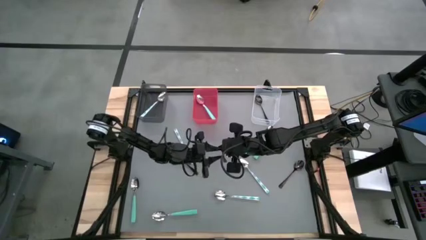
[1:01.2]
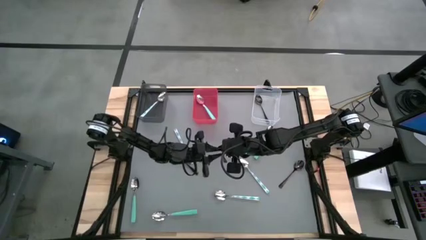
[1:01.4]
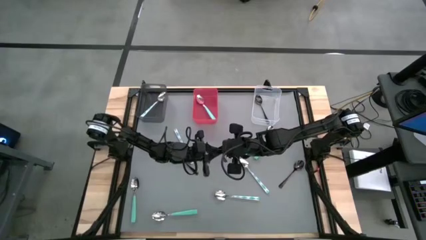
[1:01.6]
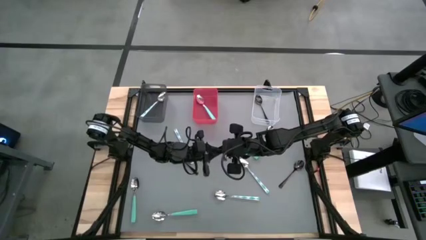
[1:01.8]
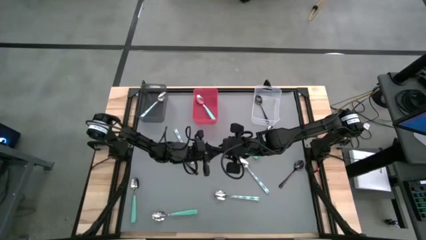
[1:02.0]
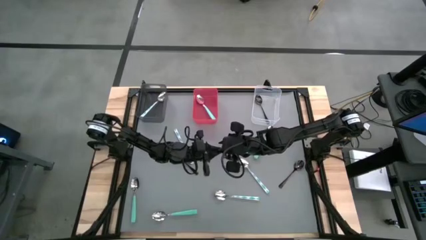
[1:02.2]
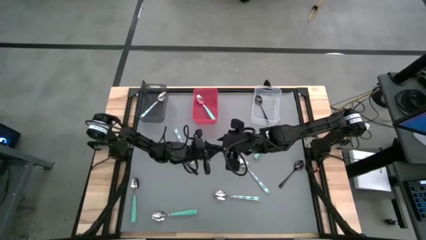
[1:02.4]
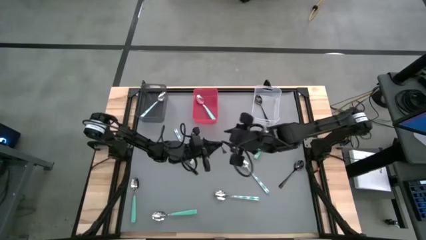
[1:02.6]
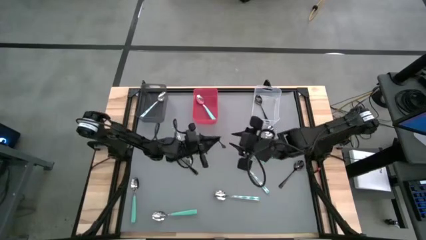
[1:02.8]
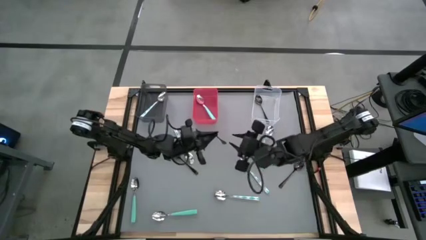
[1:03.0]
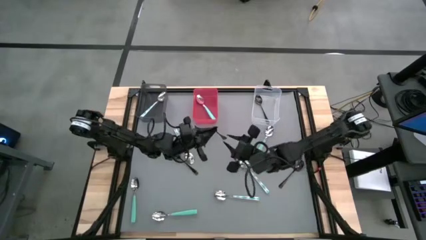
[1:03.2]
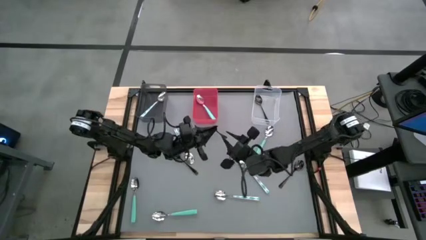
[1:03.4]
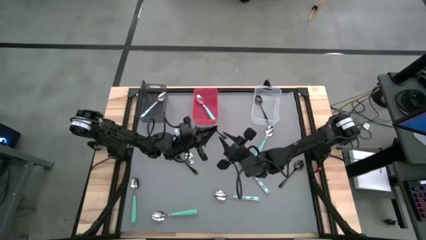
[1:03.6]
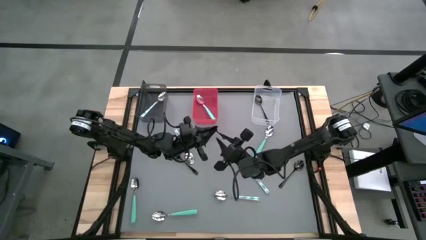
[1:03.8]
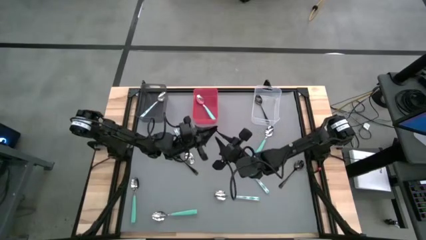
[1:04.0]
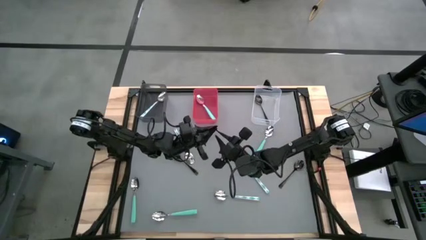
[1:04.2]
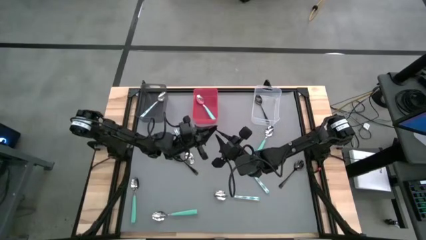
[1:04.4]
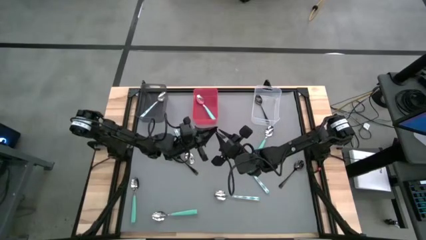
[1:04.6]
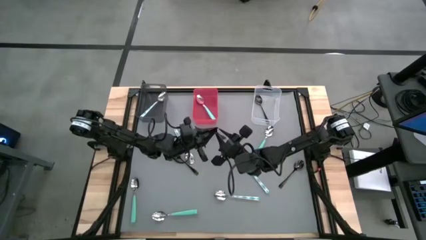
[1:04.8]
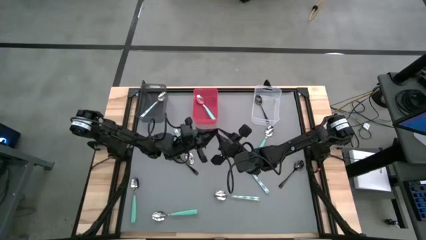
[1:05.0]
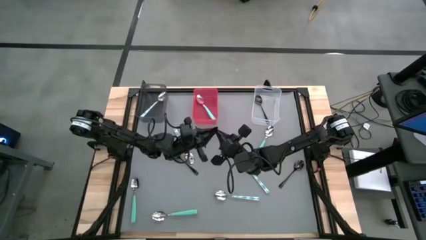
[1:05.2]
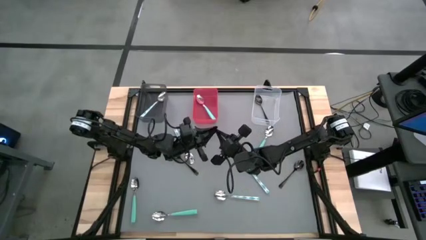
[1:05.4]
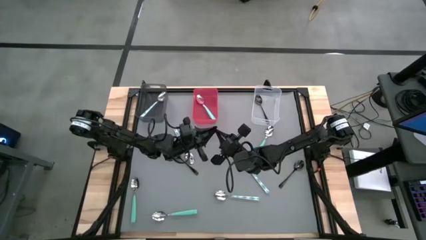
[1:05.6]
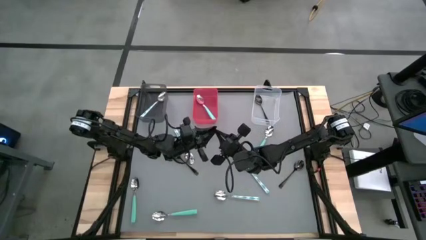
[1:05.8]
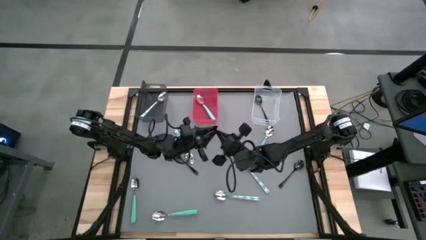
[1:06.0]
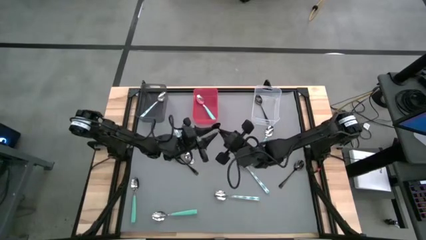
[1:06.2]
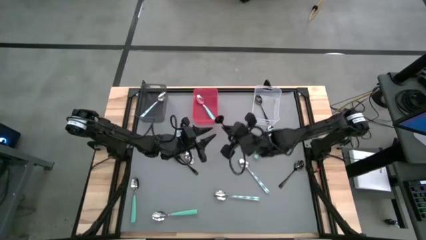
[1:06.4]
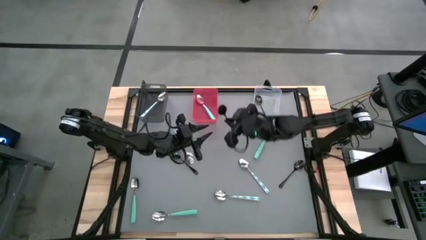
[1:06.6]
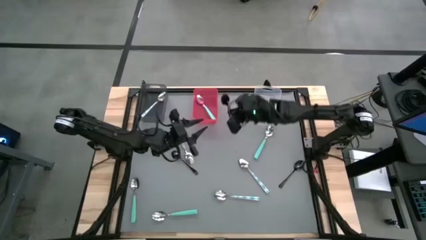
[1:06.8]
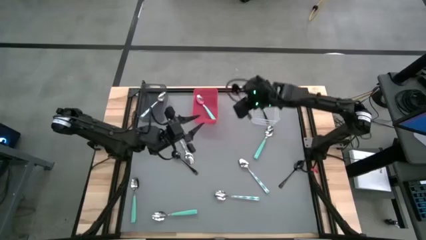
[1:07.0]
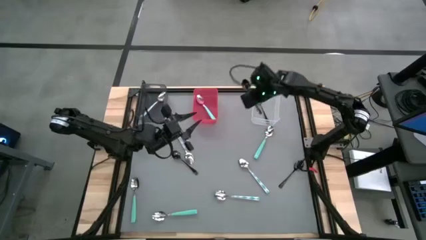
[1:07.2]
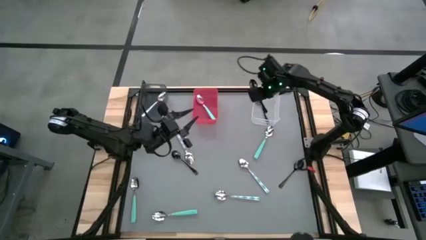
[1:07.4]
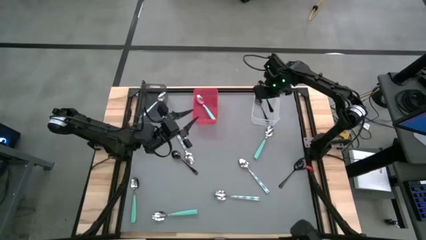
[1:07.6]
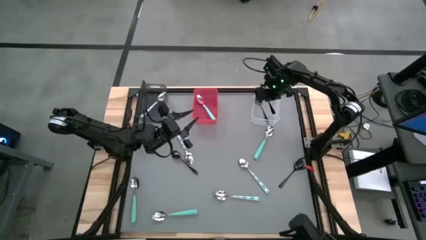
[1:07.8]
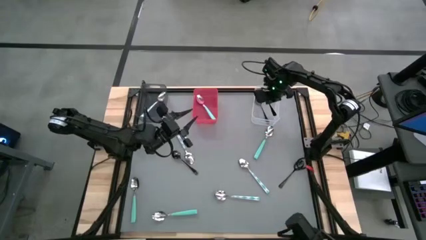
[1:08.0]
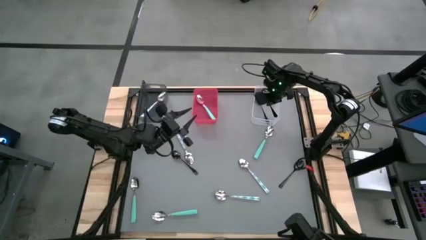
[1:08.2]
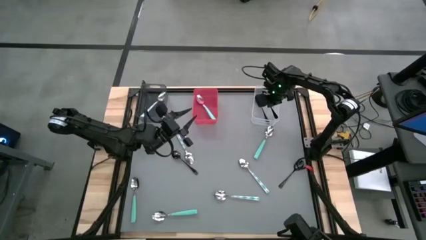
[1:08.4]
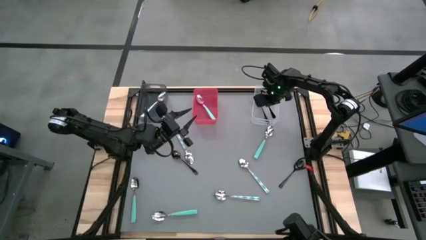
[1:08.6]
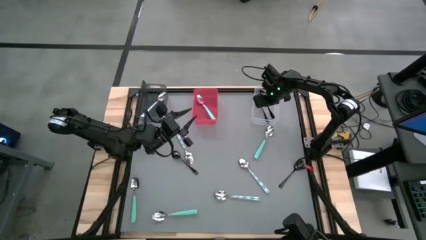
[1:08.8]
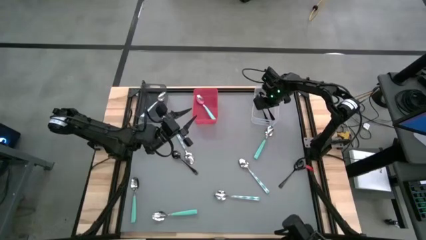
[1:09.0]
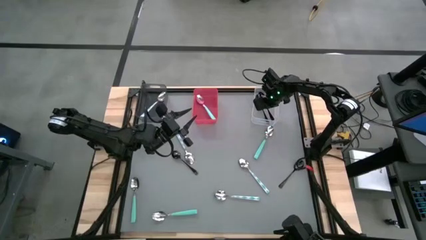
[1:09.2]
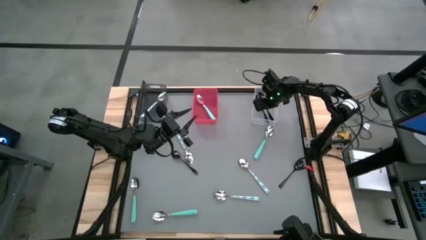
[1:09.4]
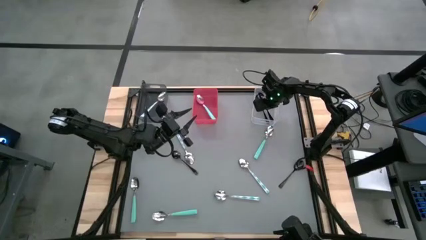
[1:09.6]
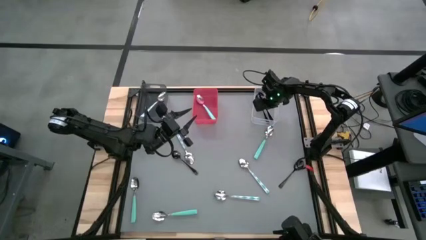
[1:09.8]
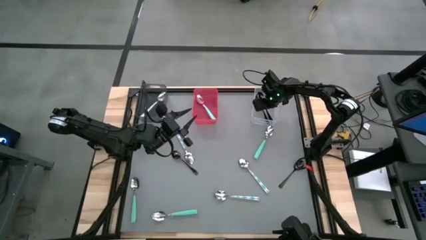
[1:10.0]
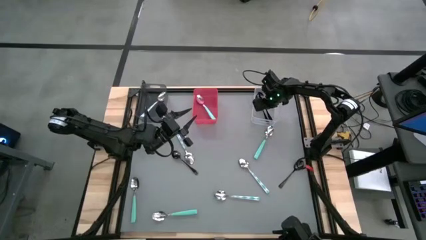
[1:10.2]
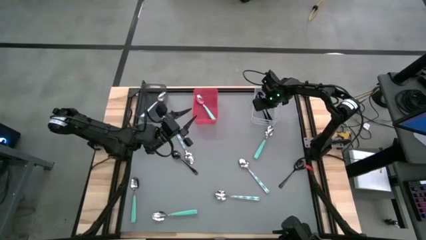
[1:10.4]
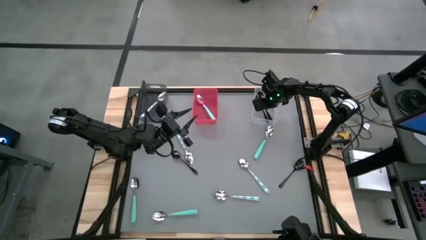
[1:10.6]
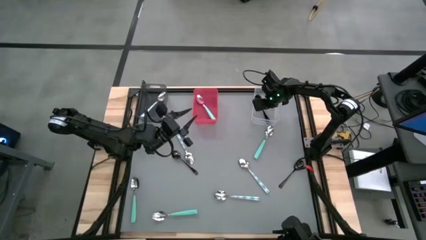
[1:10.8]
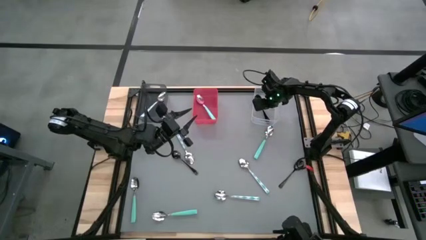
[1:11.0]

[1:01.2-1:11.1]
Task: Sort silverware by color (type)
Put the black spoon into the transparent bin

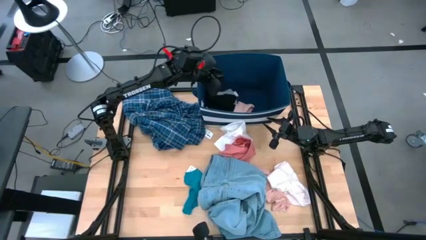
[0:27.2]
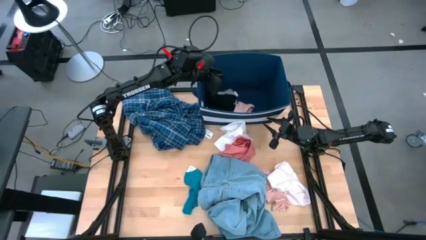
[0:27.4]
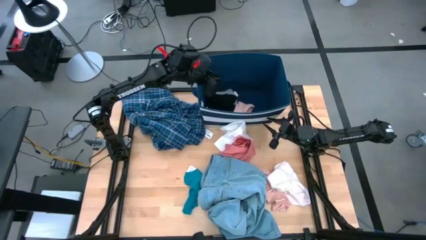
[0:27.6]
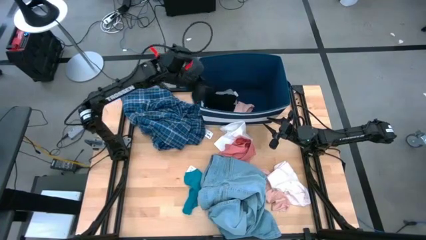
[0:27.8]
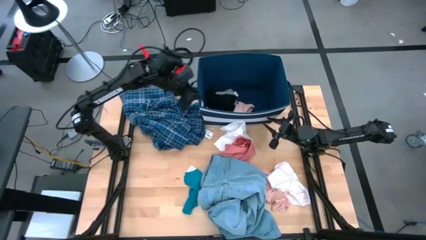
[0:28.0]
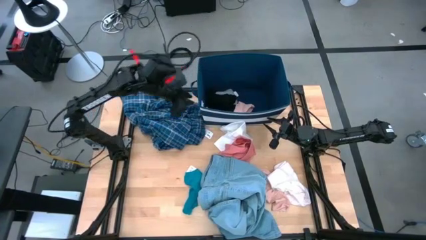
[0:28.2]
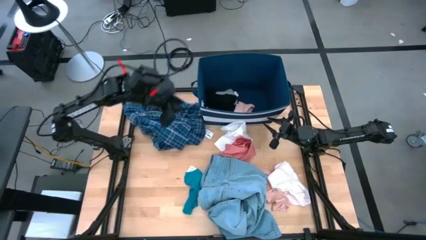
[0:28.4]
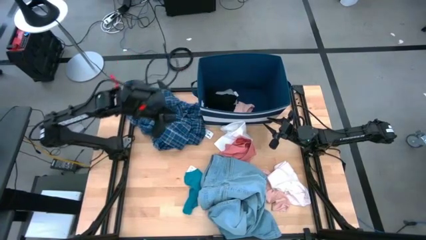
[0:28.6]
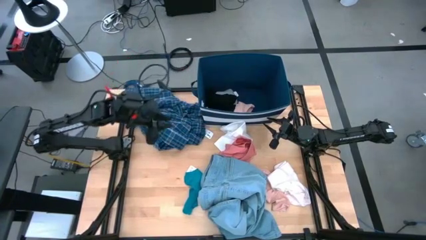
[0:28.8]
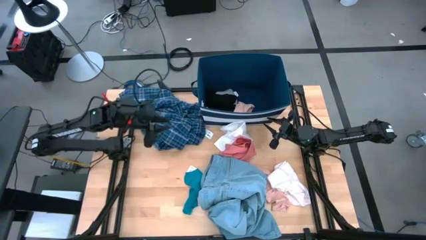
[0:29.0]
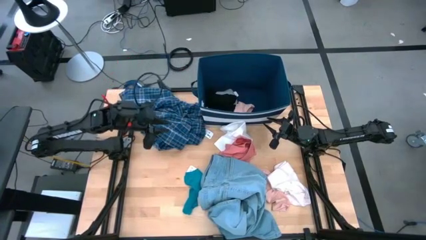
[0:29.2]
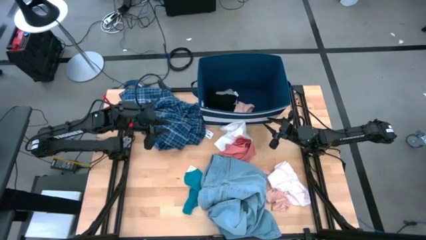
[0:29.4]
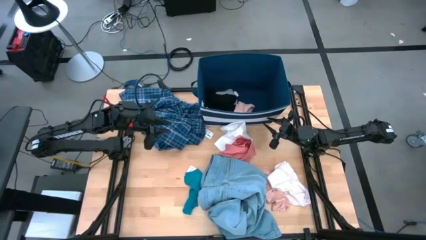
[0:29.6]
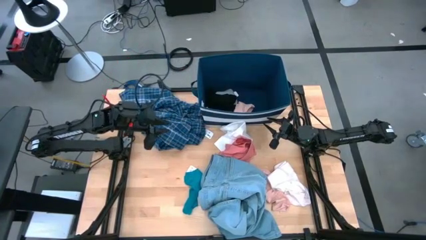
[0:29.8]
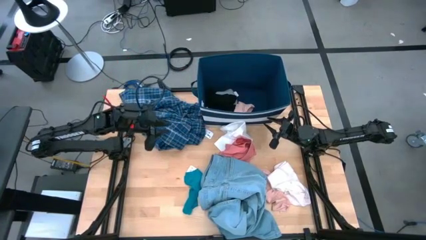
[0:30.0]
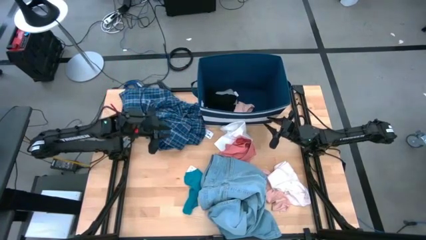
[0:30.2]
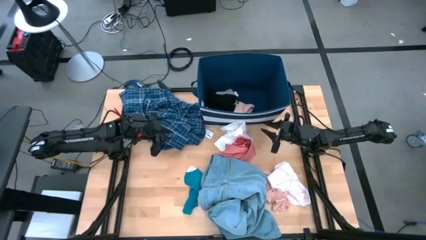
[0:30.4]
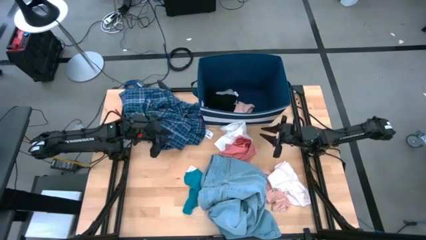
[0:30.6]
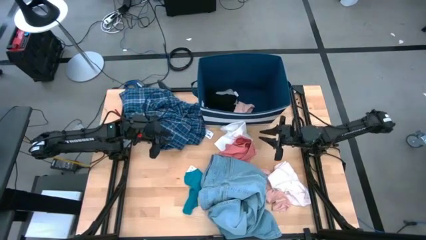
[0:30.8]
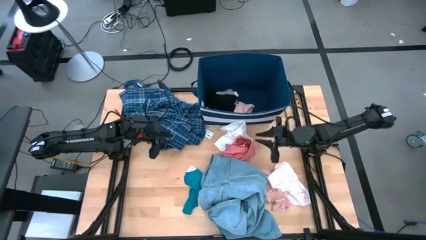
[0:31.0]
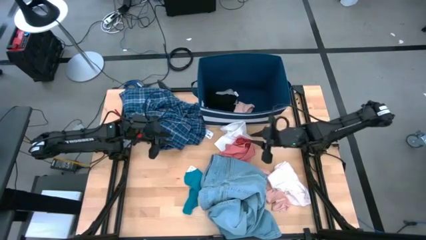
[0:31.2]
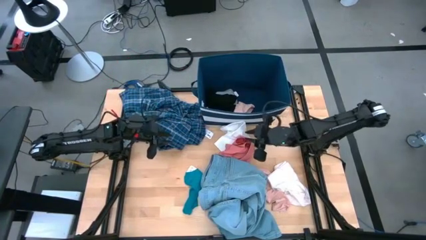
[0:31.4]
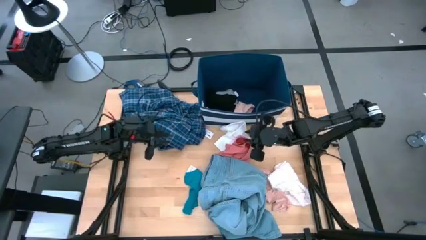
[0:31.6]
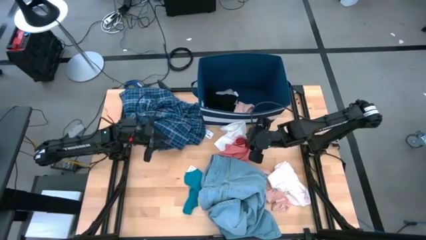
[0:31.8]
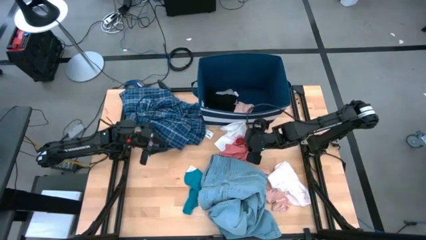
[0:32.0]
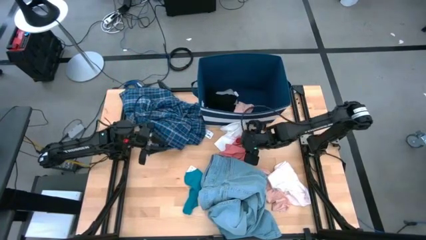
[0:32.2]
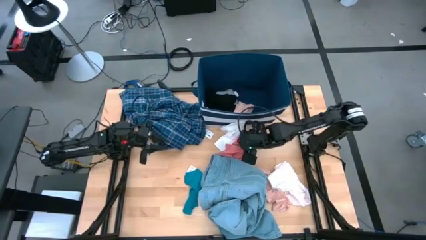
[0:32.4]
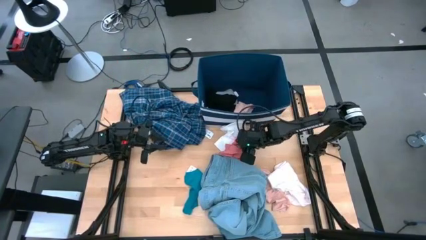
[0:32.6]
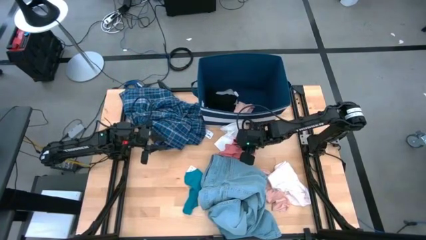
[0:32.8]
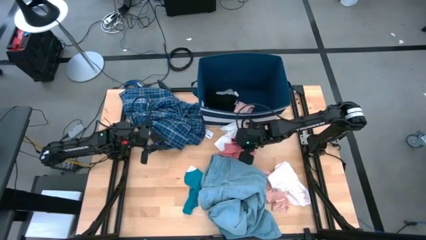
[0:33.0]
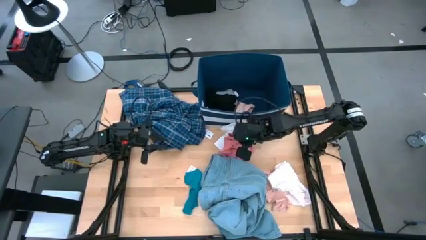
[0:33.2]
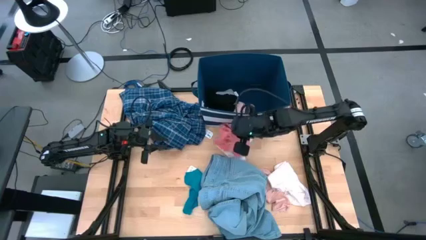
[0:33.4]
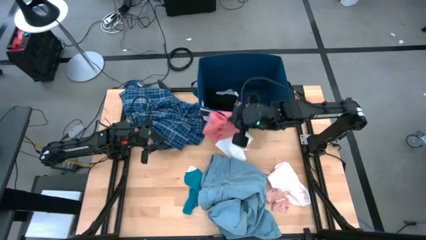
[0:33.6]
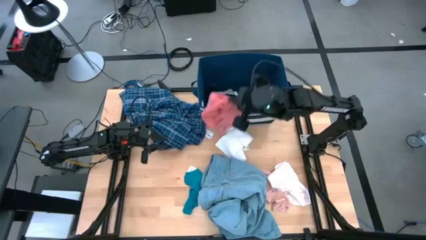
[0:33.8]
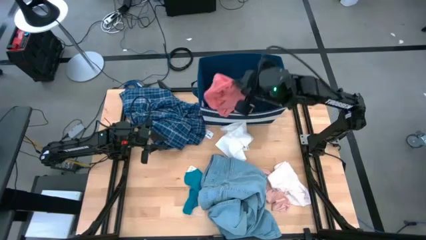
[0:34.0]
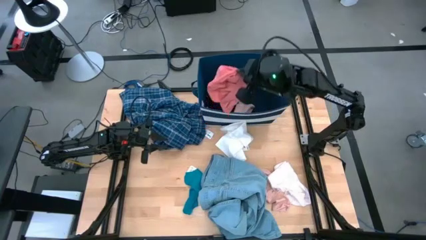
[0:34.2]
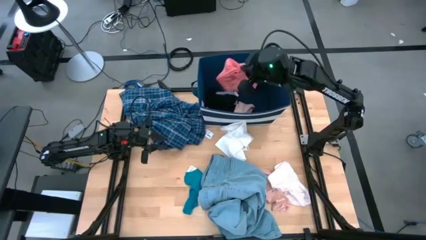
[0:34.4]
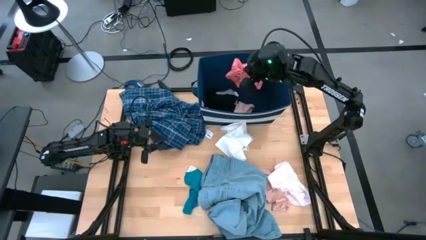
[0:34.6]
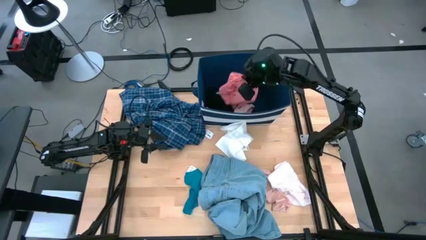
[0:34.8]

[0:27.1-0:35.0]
Task: Sort clothes
Put the pink underwear into the blue laundry bin
